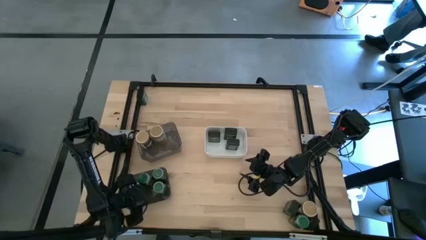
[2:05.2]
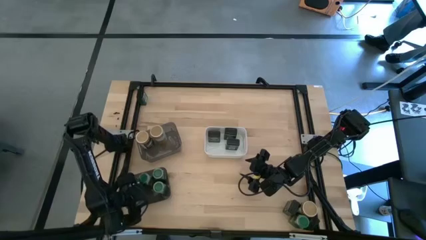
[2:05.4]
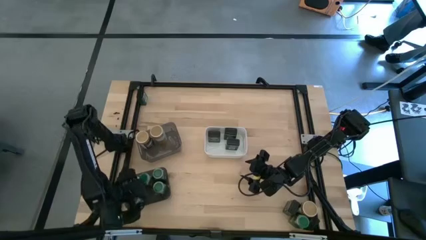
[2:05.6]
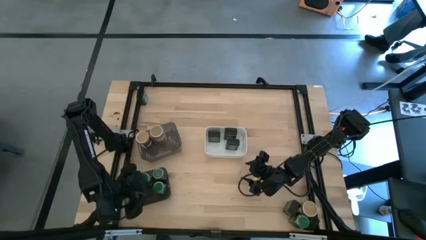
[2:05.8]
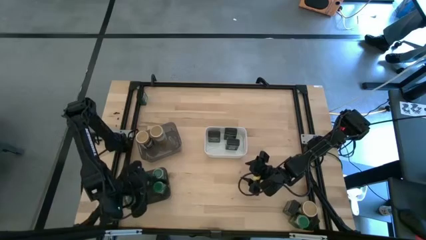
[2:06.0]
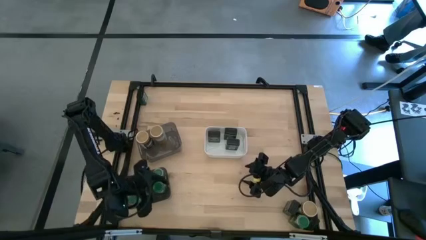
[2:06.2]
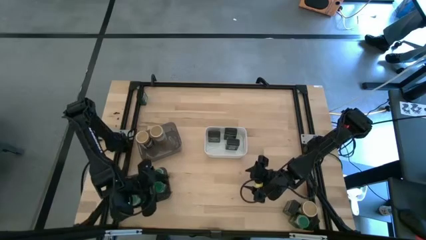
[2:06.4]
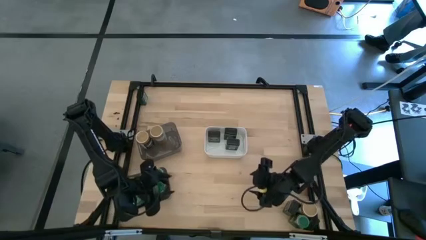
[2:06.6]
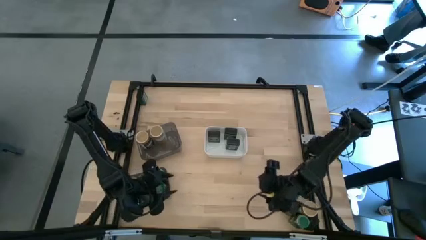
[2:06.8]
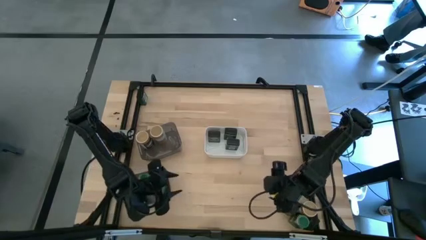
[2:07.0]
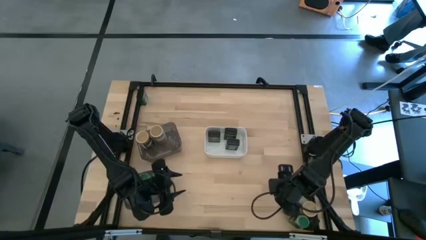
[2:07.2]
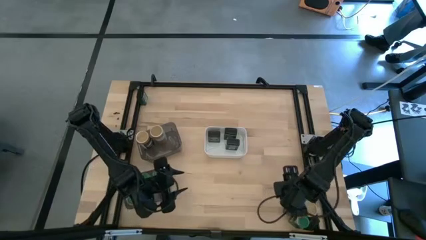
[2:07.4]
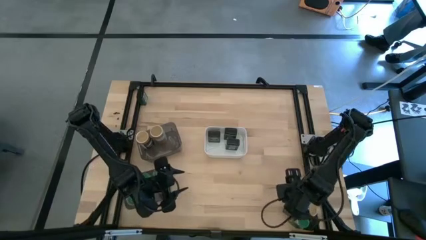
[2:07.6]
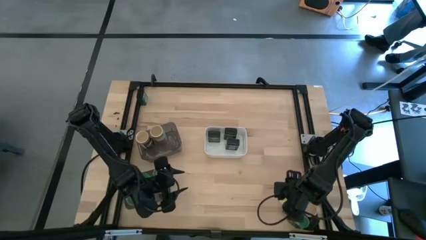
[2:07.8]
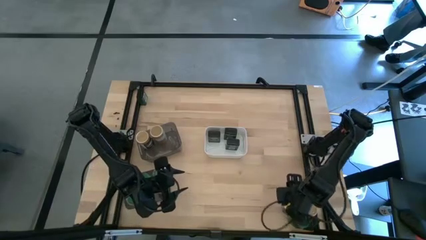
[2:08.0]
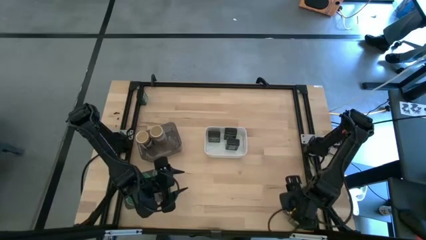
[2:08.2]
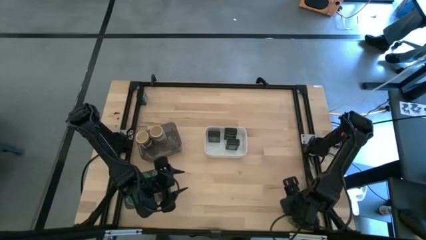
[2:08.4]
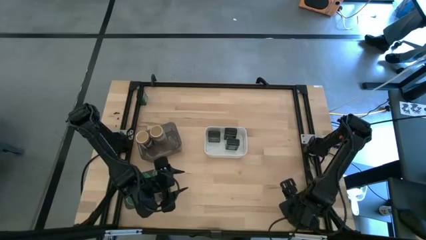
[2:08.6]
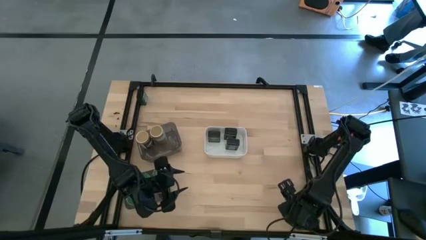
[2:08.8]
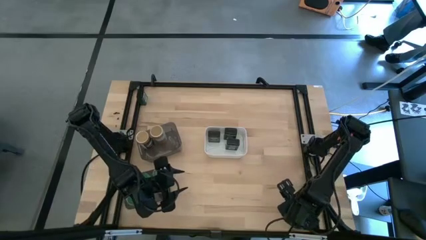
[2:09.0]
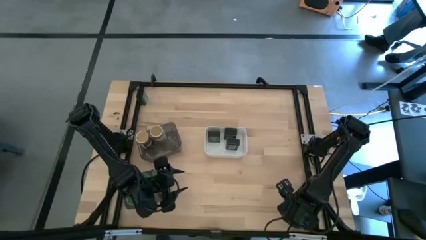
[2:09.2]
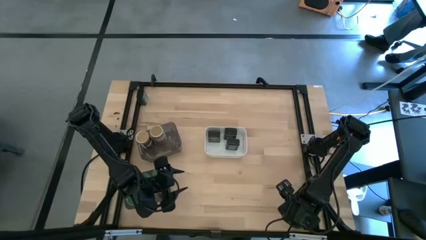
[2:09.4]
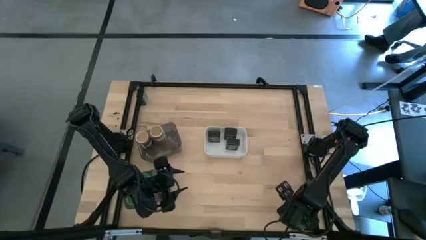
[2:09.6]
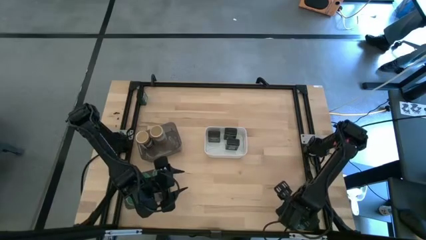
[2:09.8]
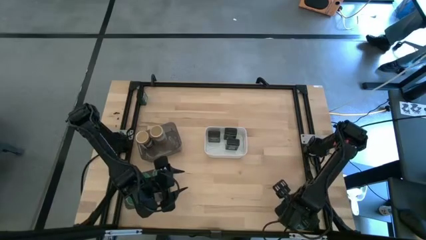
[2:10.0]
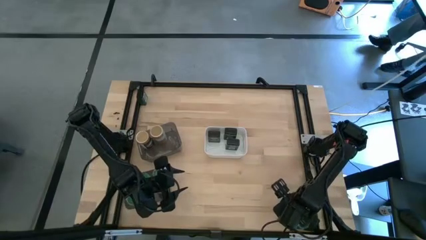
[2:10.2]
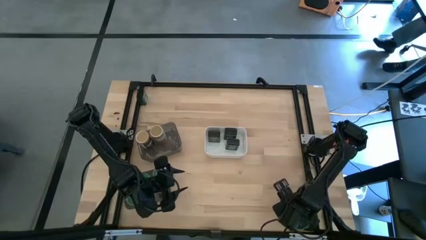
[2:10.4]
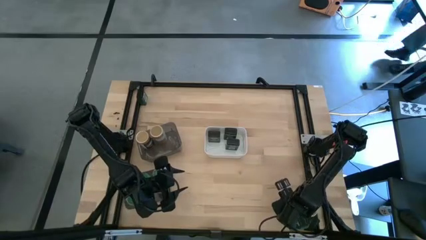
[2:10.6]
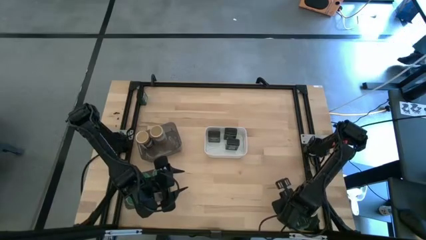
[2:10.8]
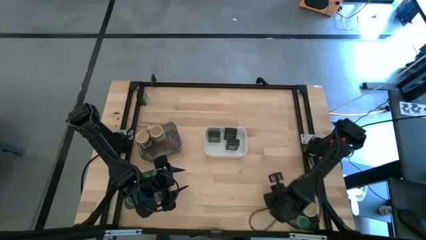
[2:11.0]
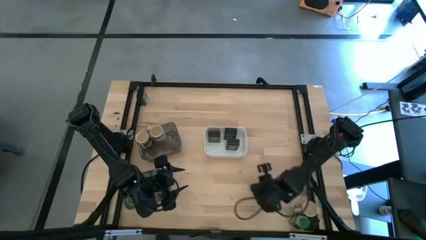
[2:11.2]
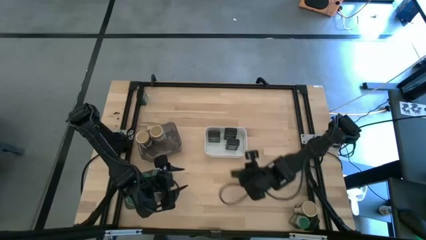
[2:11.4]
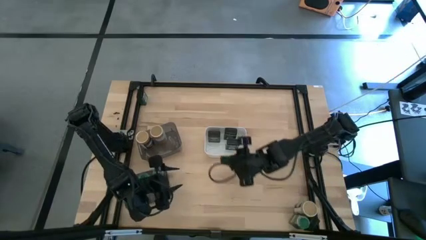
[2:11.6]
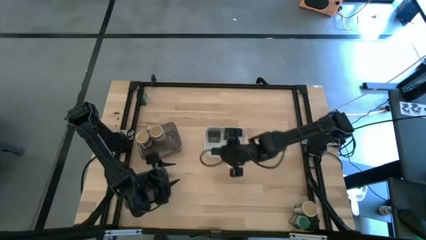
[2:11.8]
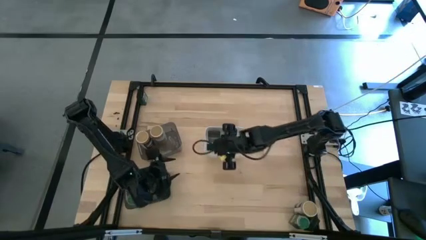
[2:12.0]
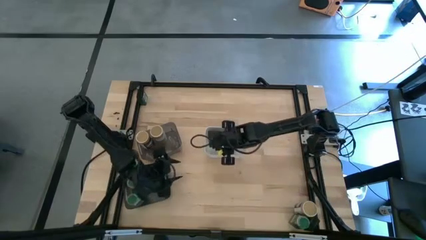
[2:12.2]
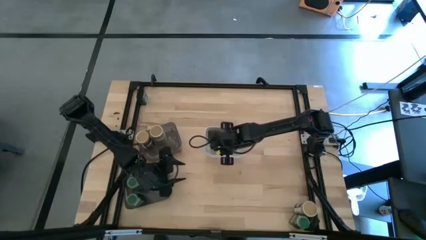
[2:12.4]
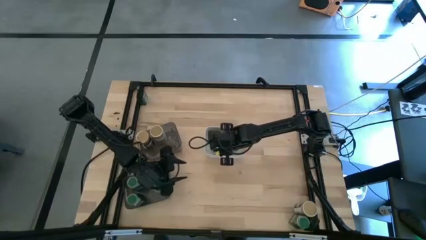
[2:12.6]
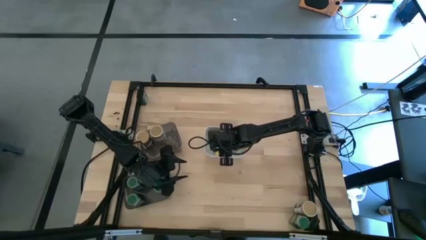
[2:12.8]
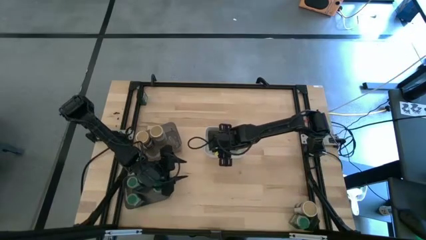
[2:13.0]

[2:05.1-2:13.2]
Task: Sort spices by type
Put the black seasoning can into the white bin

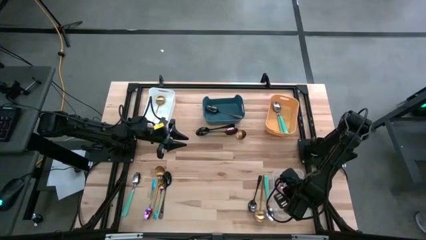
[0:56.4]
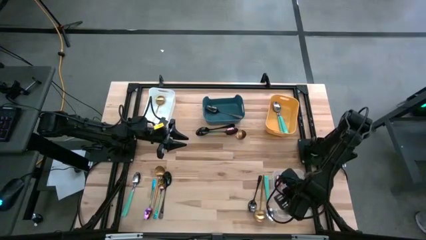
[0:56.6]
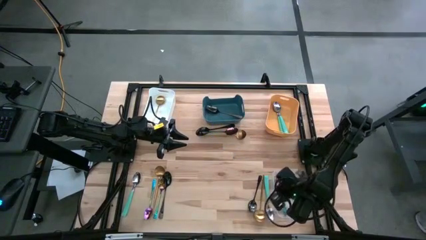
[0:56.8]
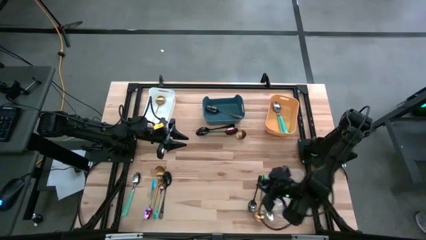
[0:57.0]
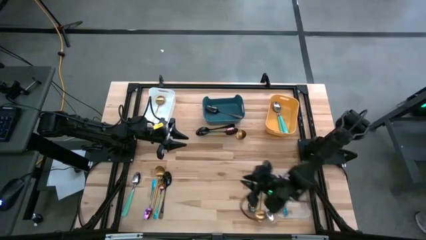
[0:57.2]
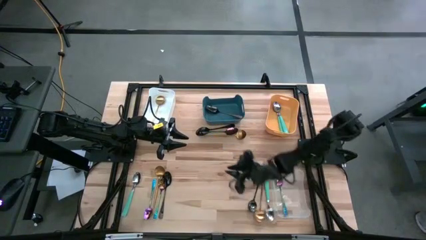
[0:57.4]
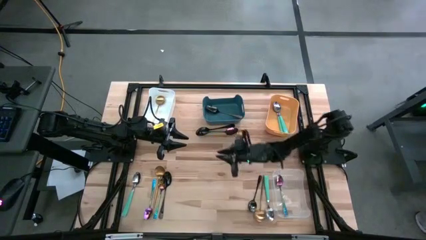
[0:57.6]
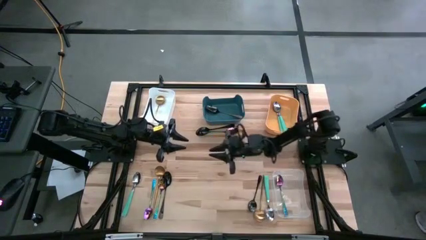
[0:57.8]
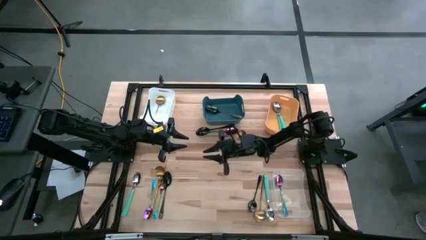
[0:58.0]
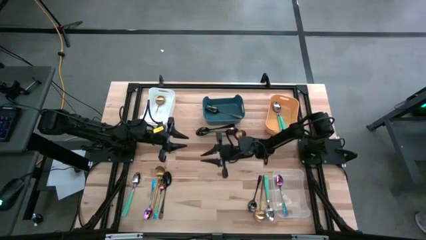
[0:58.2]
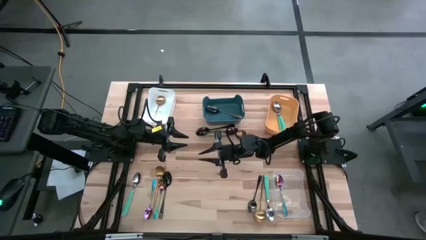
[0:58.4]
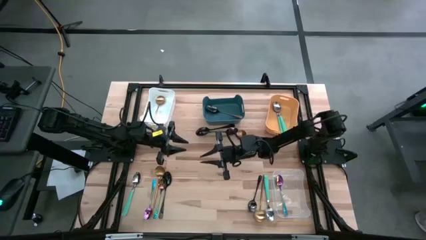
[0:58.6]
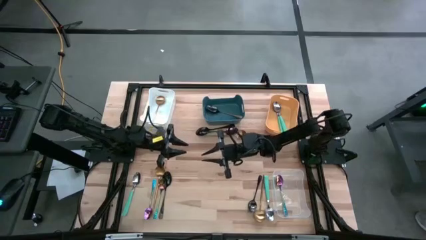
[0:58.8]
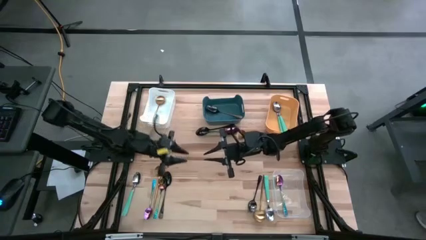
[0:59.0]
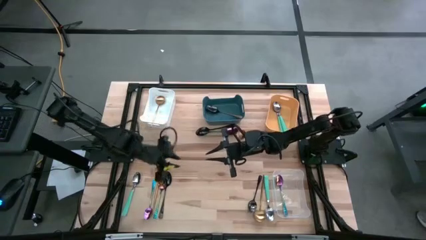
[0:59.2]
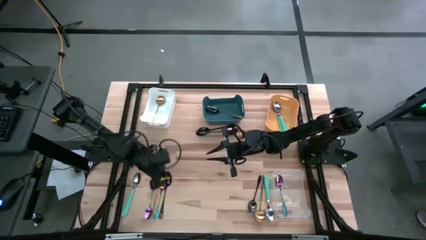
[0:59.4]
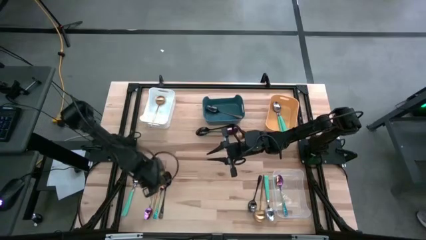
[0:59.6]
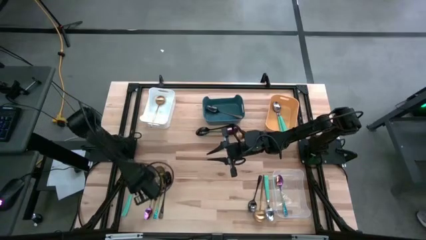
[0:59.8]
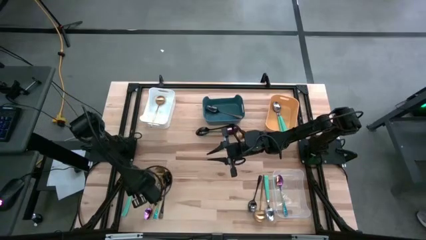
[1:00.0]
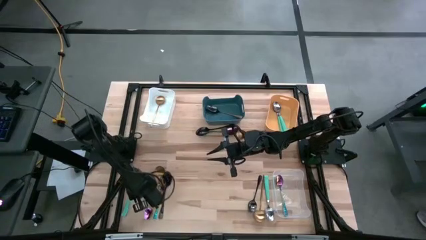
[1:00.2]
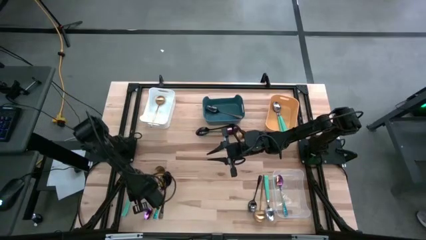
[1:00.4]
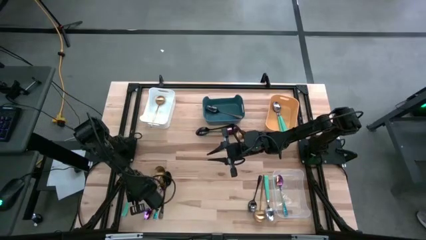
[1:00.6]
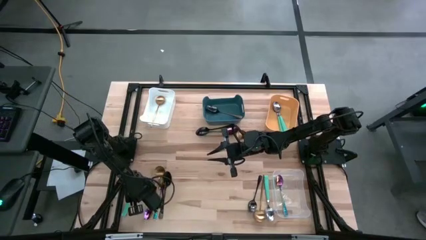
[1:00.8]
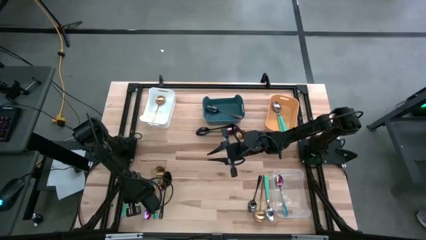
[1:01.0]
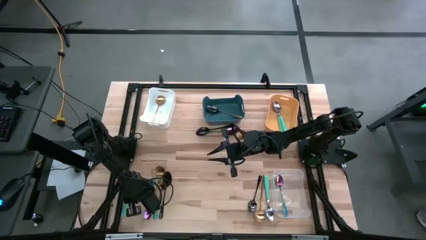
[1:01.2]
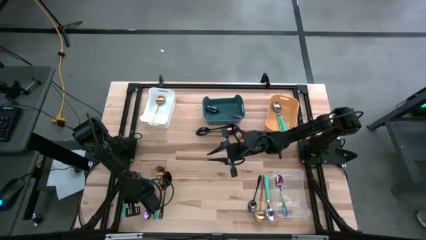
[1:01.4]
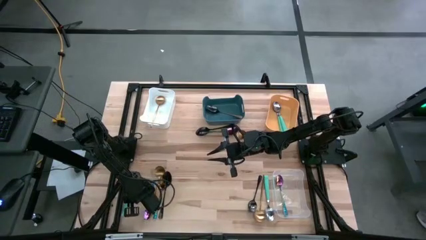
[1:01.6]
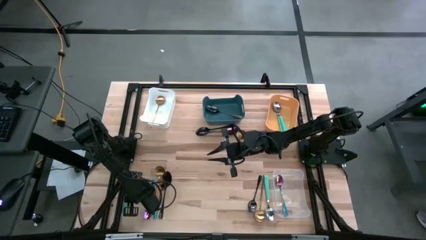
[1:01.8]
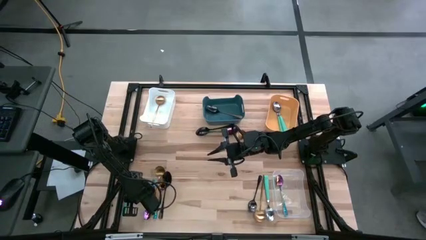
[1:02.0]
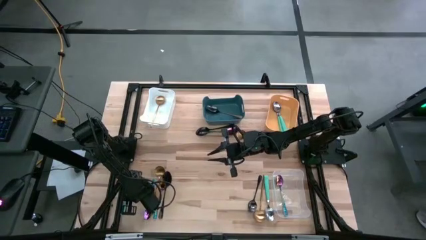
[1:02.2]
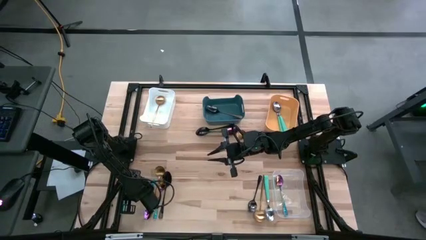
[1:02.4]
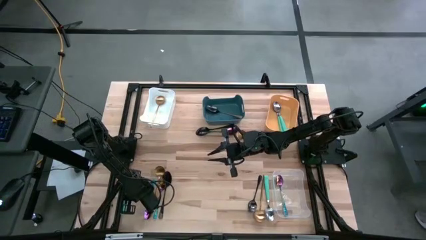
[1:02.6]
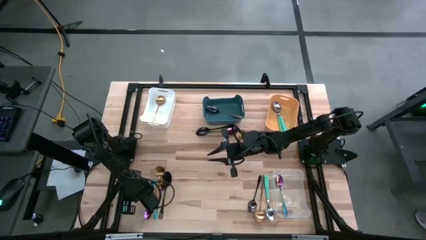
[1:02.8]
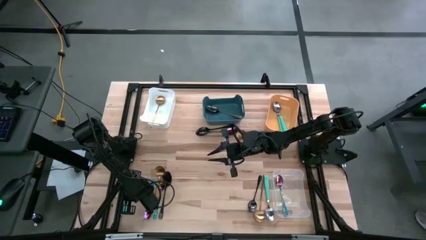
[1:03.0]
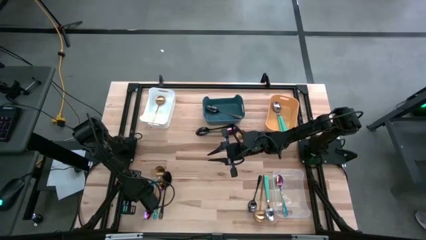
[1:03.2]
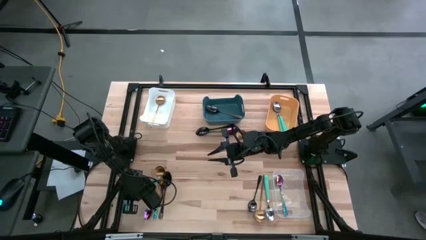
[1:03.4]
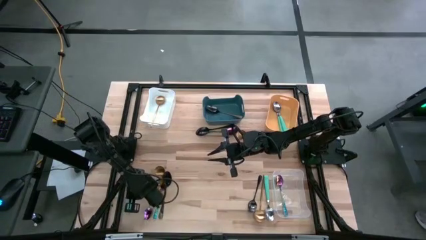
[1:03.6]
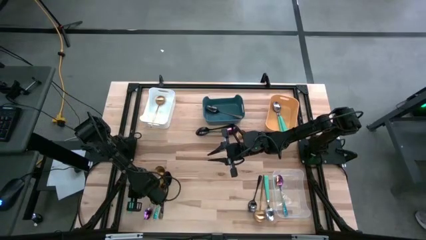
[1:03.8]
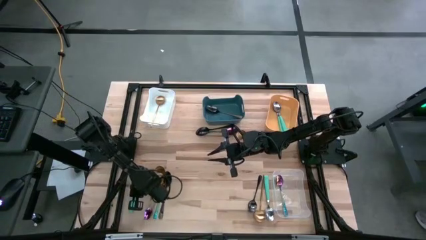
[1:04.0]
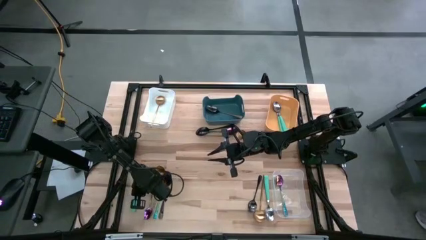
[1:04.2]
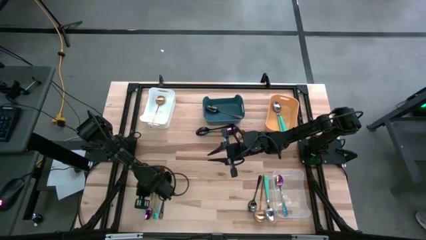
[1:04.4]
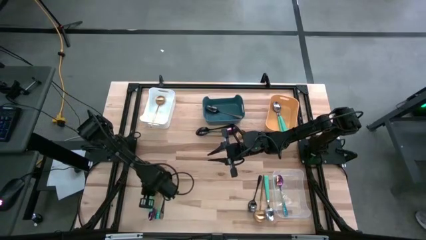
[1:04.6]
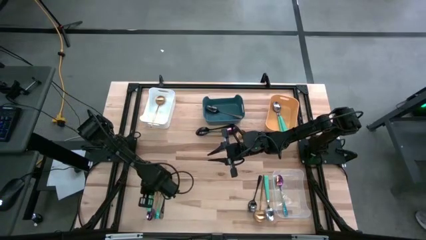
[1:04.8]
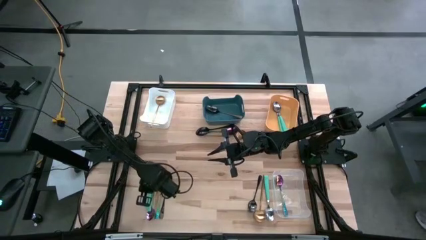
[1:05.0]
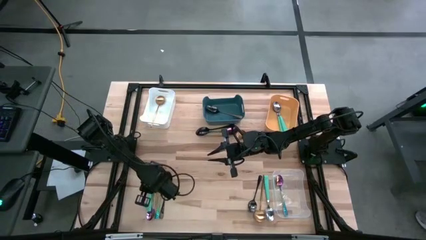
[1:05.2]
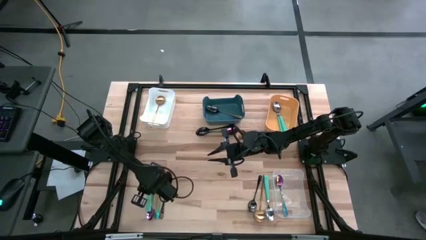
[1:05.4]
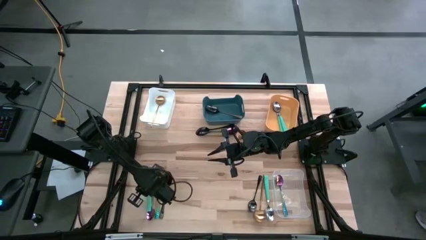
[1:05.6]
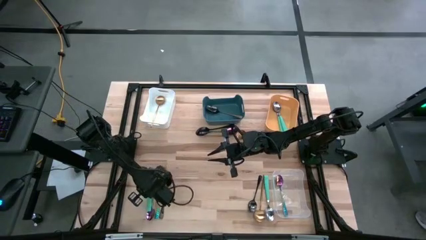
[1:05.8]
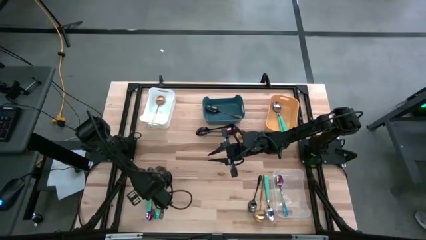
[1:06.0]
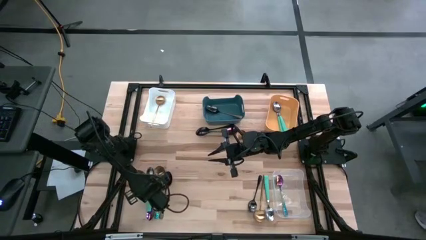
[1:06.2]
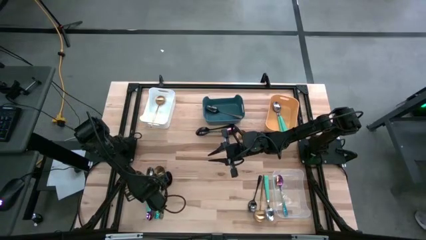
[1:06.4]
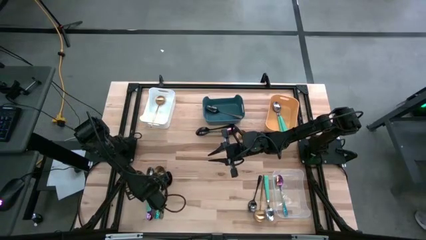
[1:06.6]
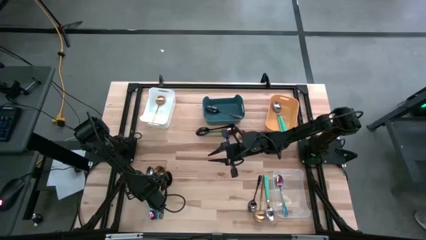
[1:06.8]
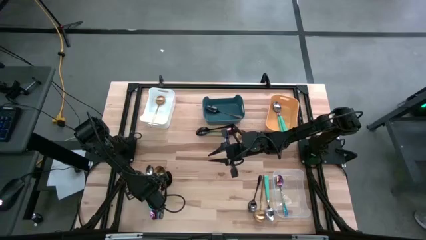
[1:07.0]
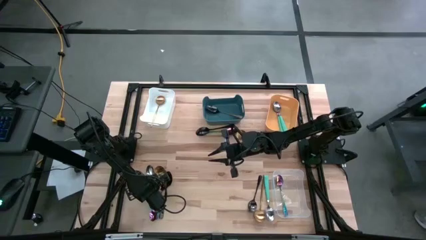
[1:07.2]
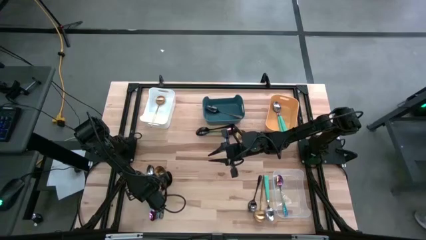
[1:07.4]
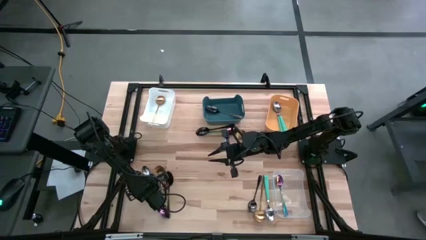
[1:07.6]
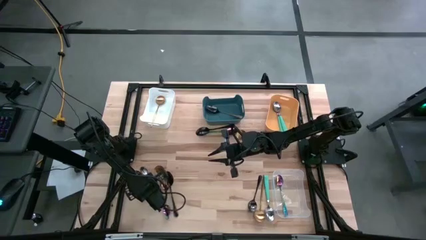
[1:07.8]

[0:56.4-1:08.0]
Task: Sort silverware by color (type)
Put the light green spoon into the orange bin
